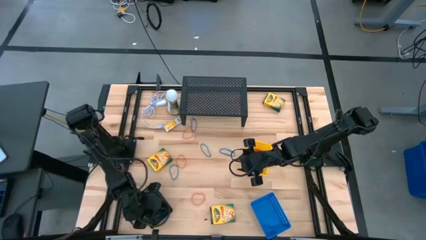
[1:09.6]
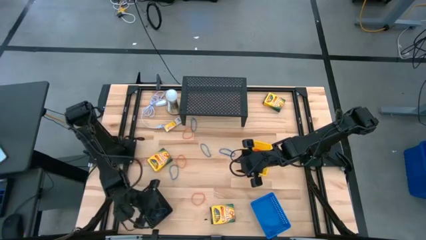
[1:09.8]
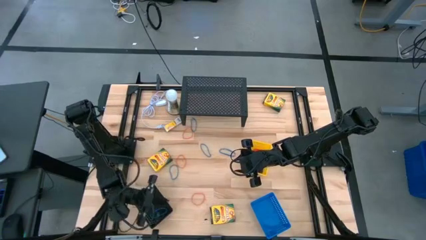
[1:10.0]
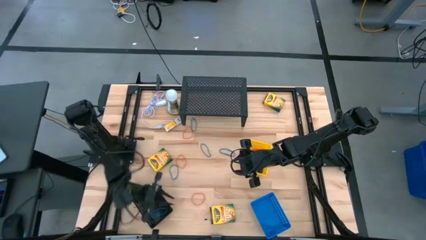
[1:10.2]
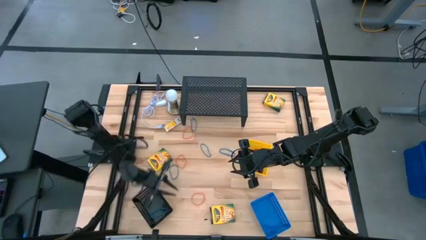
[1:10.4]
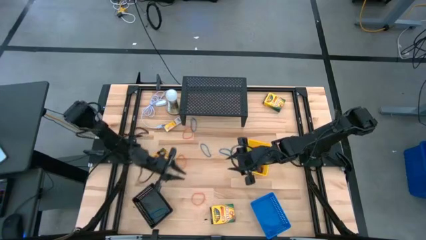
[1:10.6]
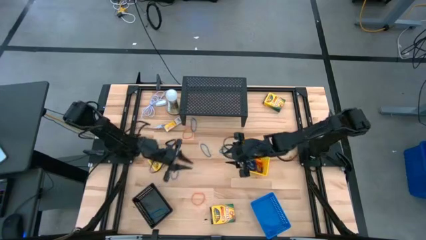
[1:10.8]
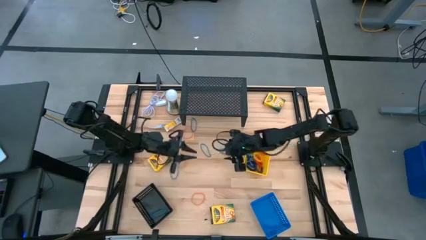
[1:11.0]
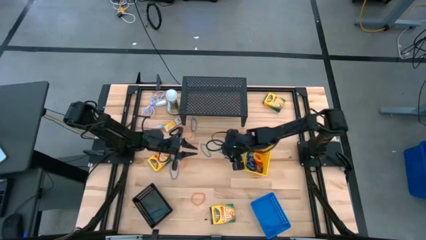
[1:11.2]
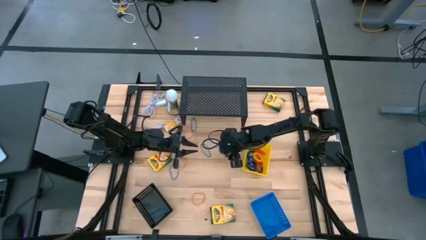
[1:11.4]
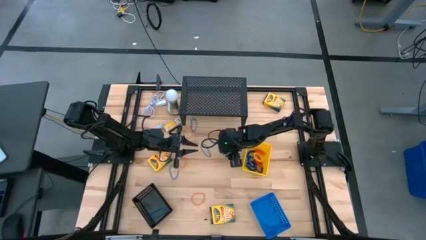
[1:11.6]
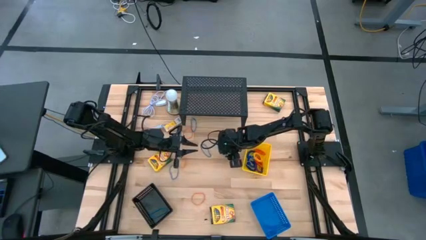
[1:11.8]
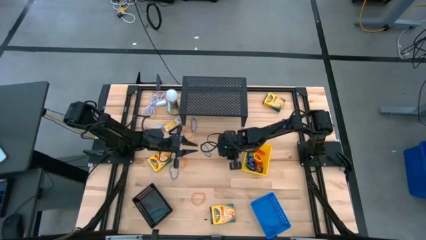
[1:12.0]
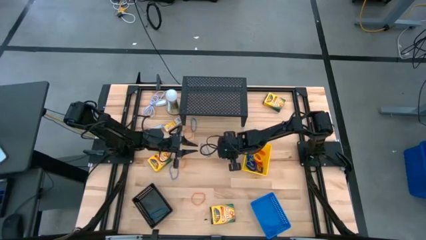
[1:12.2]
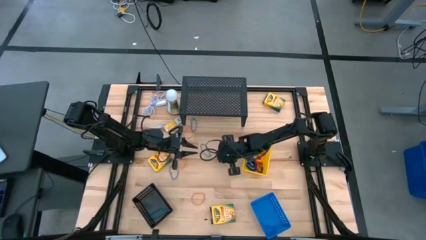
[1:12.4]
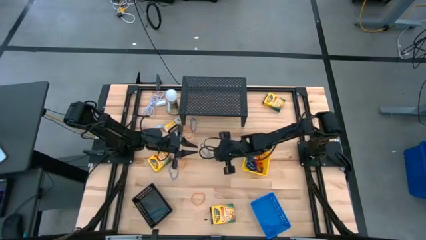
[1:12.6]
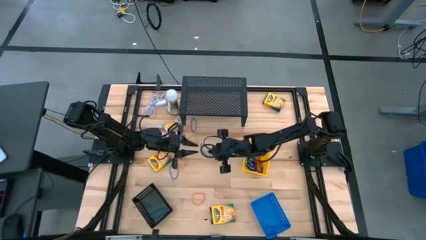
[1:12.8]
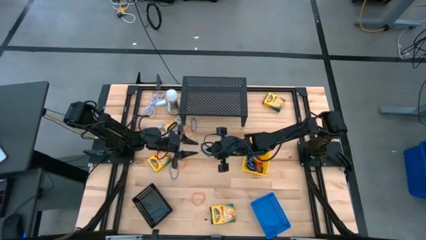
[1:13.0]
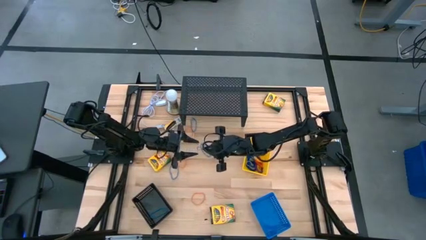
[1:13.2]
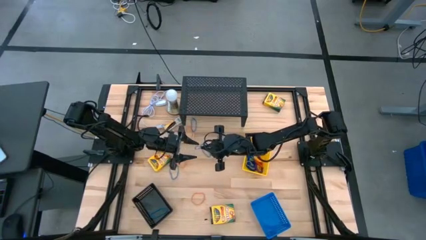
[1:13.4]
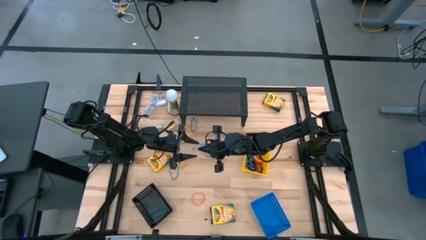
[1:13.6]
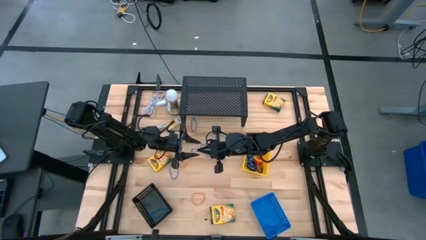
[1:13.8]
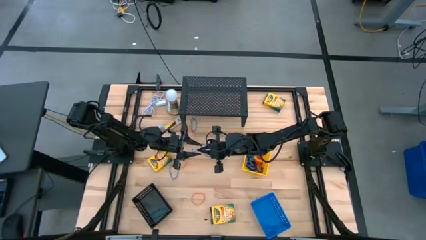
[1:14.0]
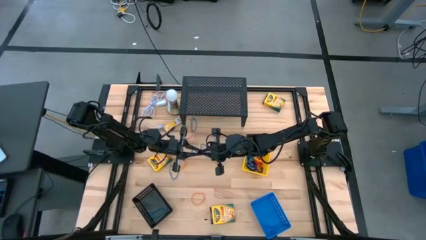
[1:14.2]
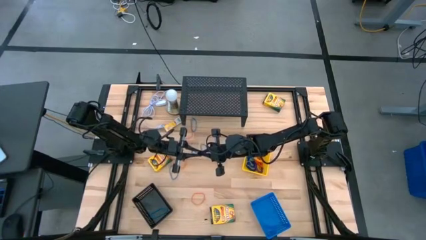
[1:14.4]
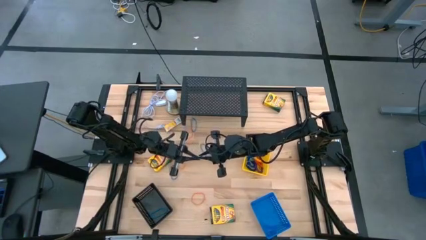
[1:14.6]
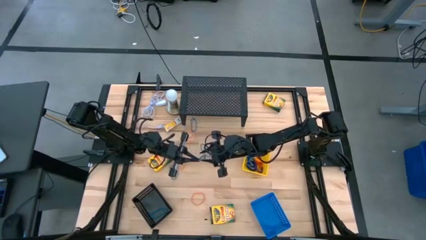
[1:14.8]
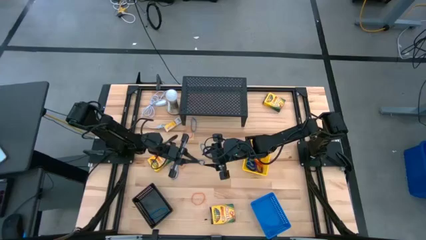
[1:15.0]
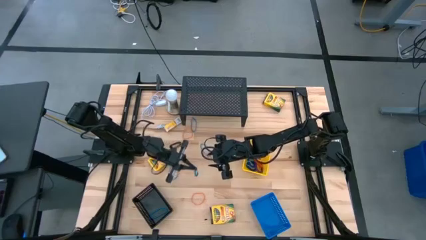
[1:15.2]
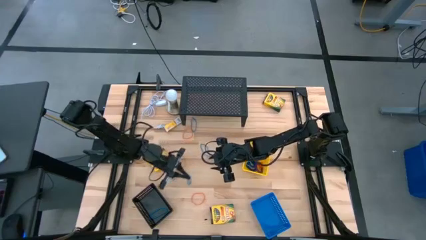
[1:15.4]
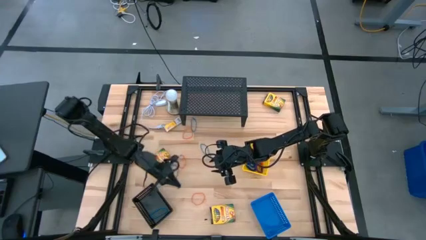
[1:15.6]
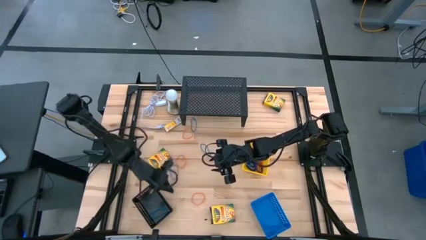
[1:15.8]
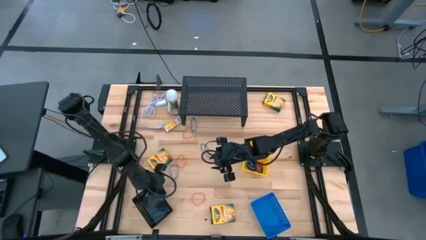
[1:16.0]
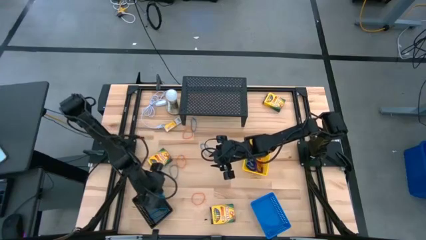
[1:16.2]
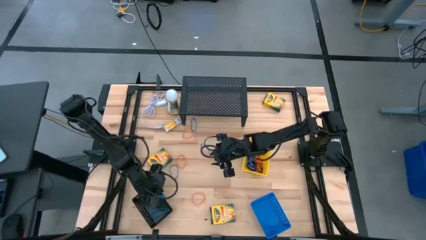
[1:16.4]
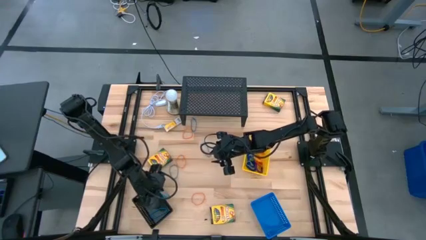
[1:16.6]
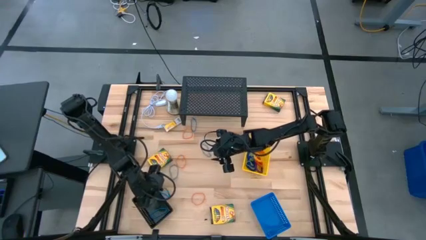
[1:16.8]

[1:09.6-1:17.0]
Task: Pick & Place Office Desk Supplies
Put the blue rubber band into the black basket

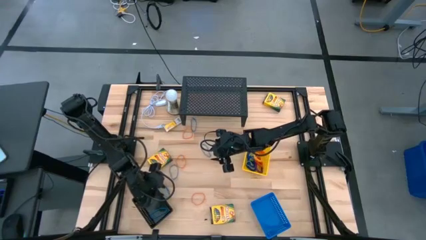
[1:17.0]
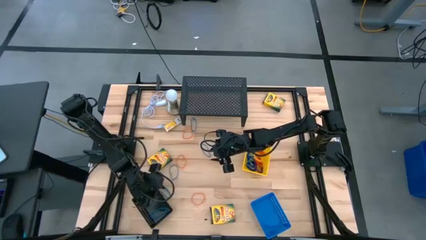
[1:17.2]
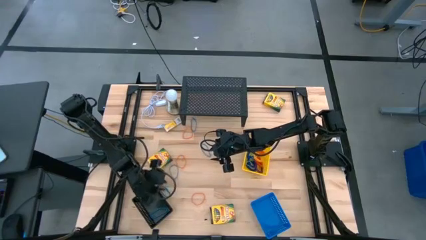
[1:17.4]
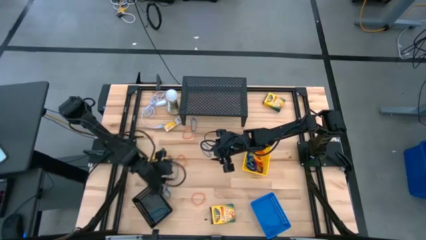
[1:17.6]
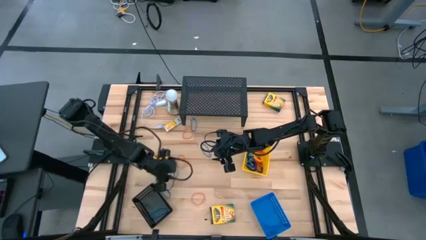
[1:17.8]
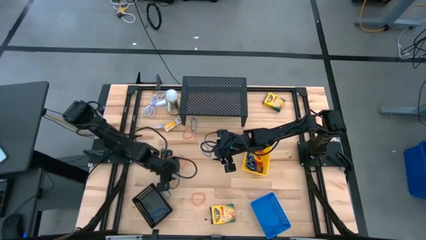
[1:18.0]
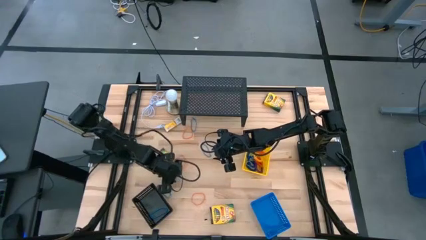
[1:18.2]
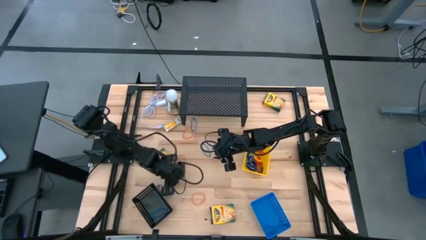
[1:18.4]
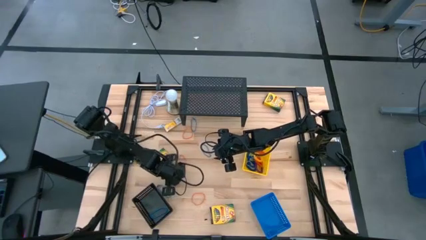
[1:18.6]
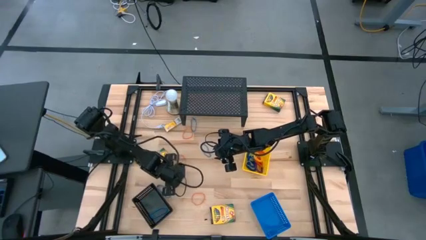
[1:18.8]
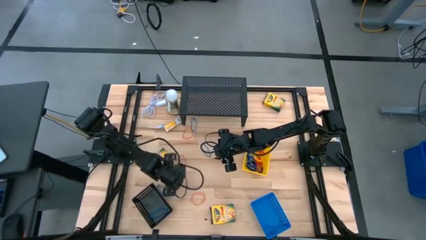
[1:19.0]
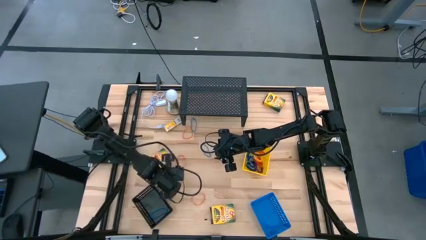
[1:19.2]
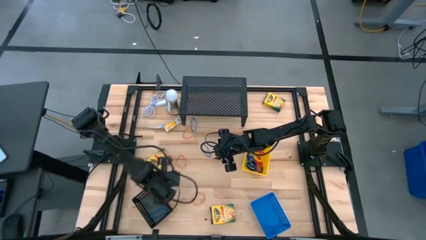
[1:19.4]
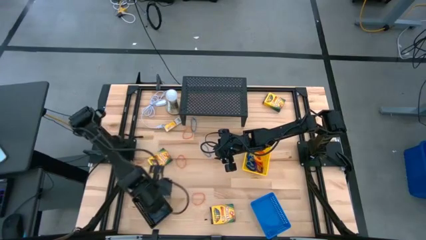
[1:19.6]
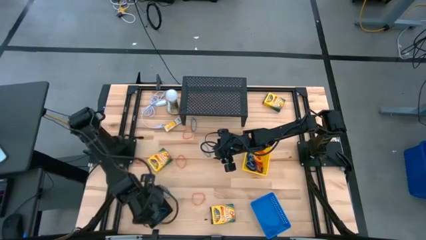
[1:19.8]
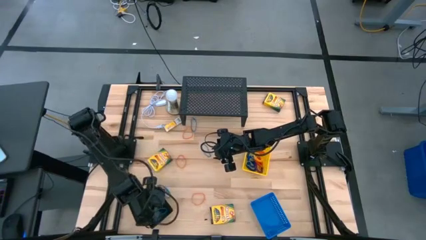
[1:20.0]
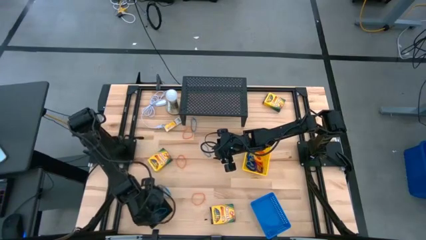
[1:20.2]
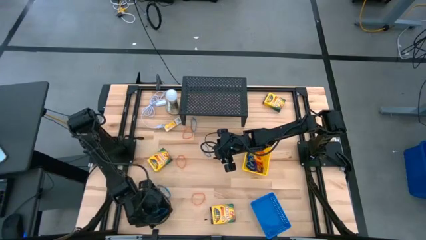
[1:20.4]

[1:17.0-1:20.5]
Put the blue rubber band into the black basket

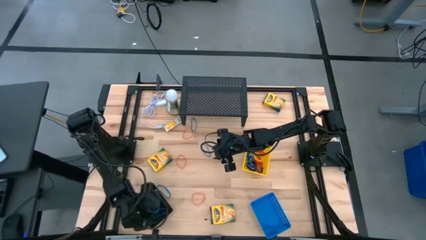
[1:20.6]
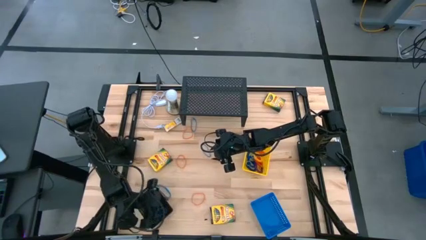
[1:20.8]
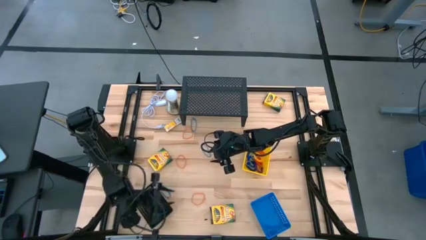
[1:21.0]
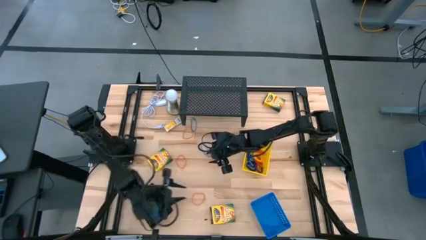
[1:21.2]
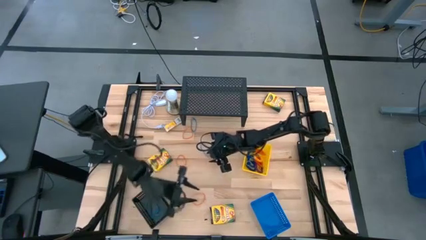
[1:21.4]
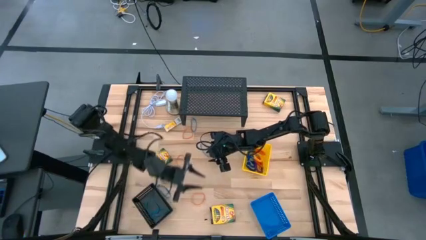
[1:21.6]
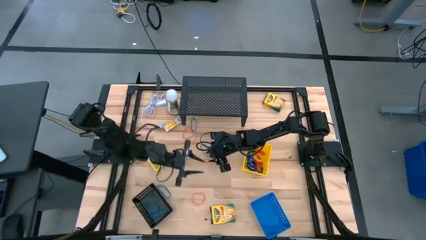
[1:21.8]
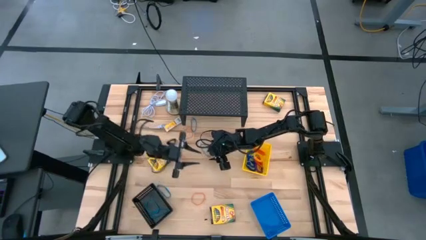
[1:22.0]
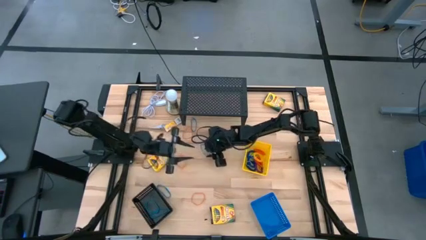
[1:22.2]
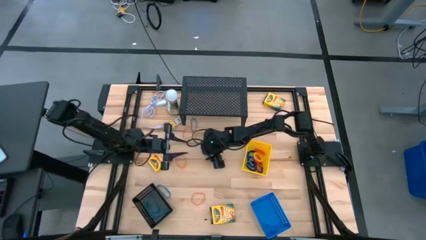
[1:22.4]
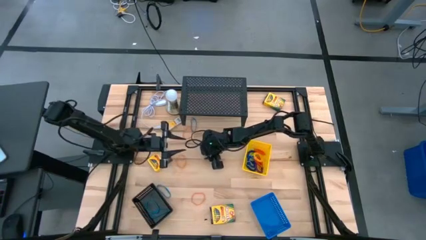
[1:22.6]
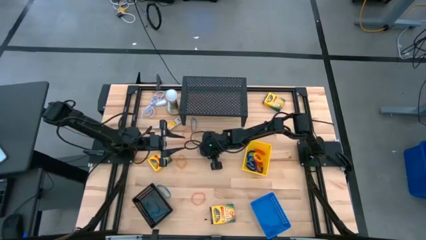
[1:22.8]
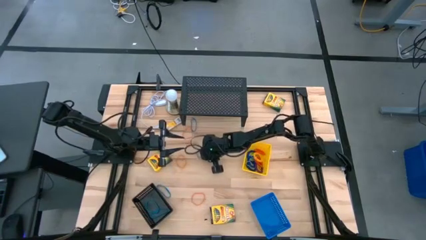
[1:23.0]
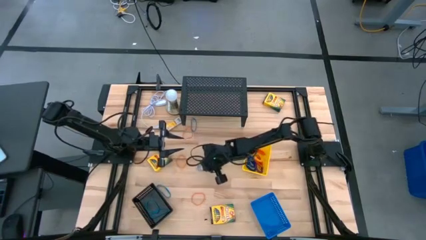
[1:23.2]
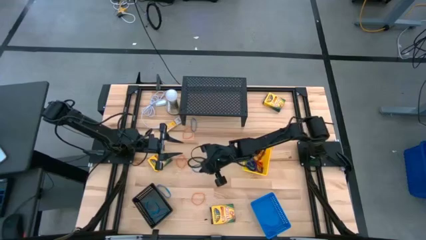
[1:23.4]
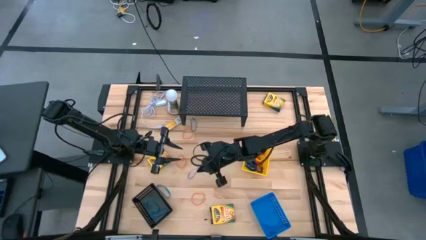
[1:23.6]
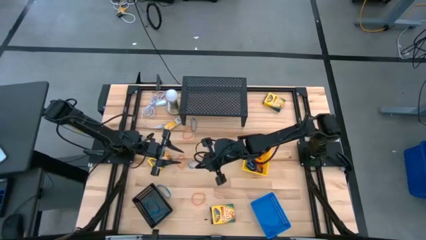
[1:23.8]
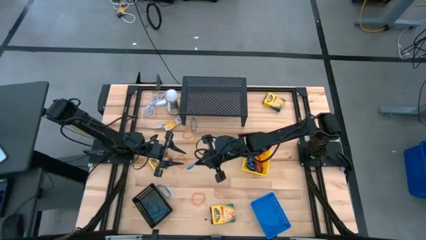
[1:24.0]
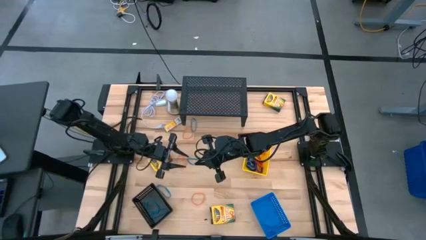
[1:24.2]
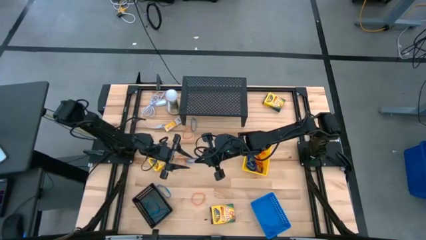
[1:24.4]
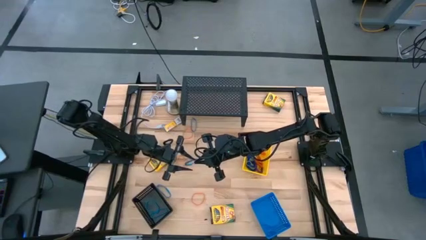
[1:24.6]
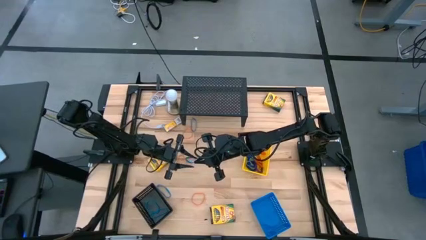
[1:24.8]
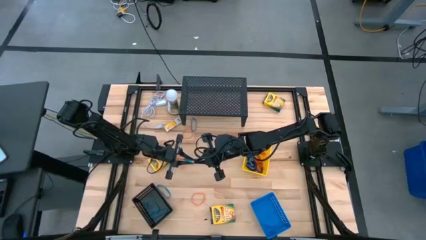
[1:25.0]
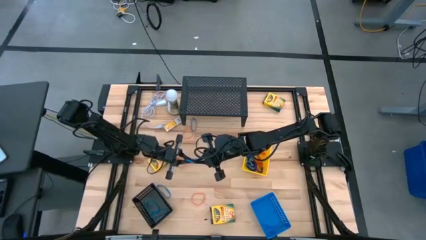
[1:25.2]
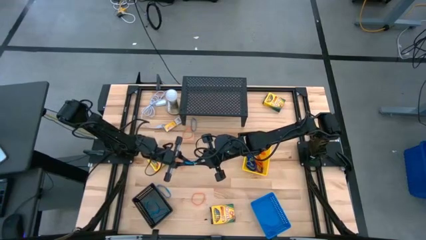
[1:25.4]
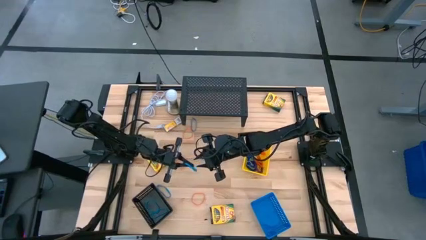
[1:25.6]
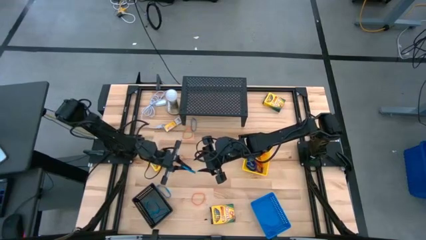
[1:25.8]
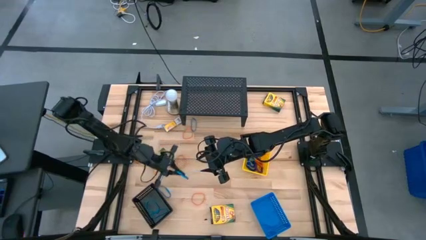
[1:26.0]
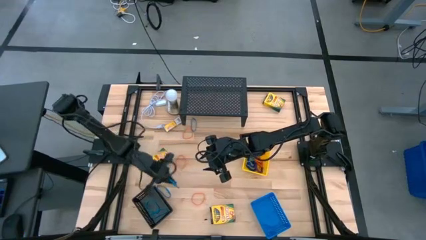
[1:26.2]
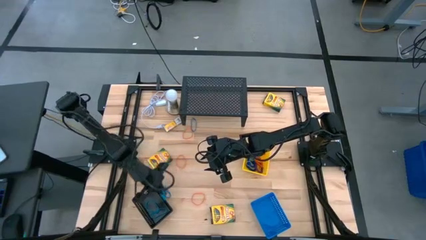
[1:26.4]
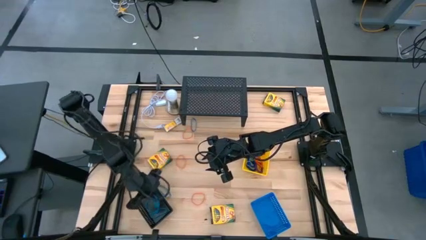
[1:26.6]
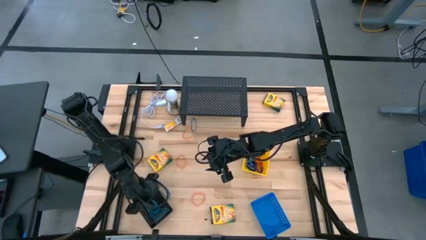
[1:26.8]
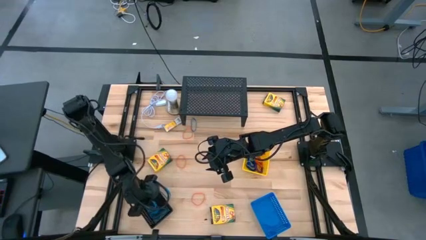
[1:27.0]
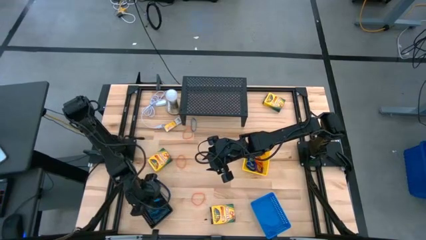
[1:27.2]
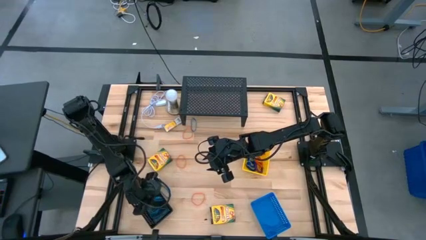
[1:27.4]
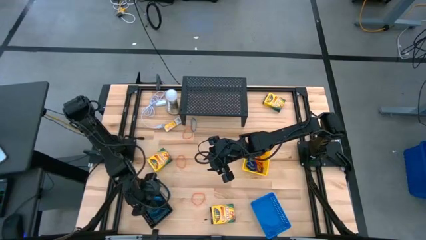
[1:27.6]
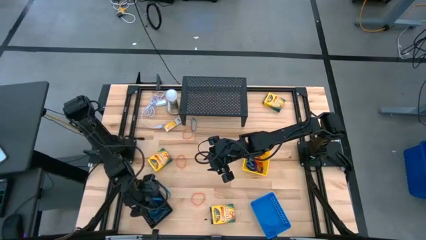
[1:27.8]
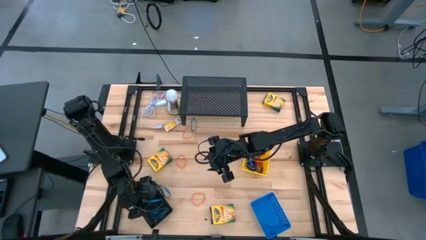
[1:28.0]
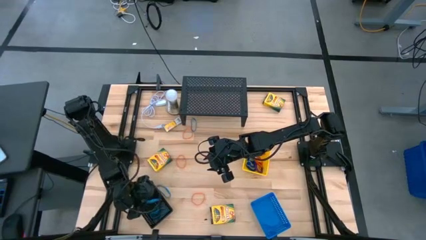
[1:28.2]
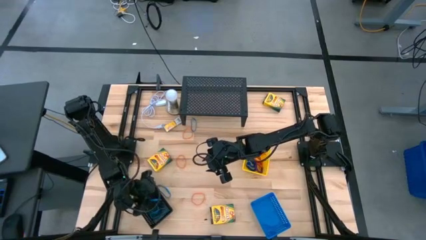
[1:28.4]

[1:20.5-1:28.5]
Put the blue rubber band into the black basket
